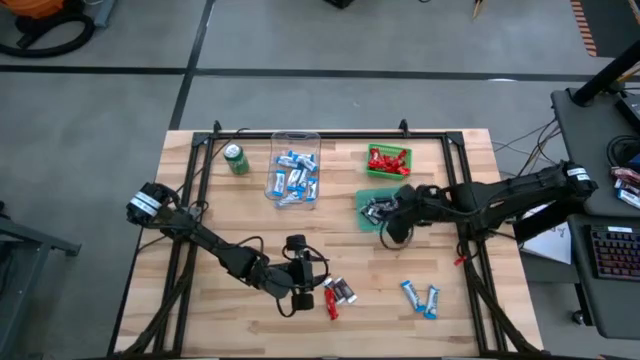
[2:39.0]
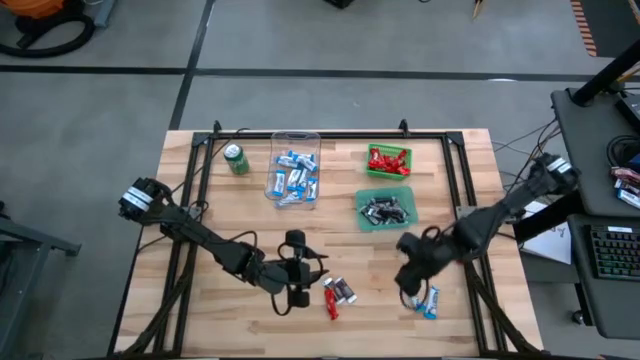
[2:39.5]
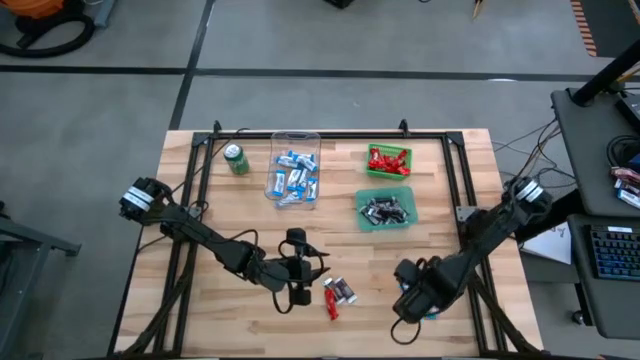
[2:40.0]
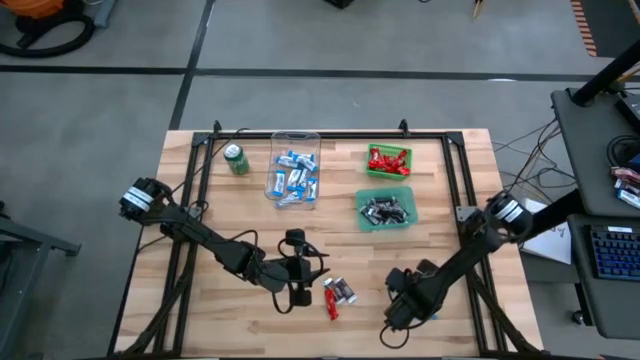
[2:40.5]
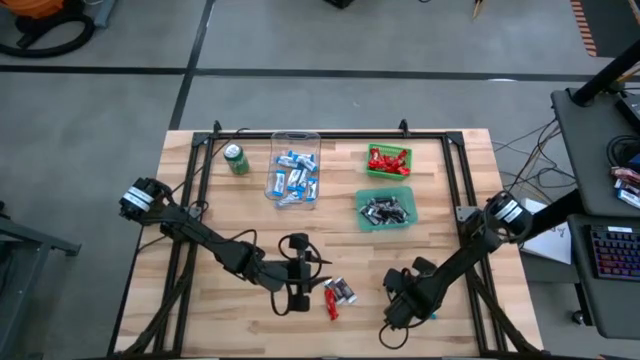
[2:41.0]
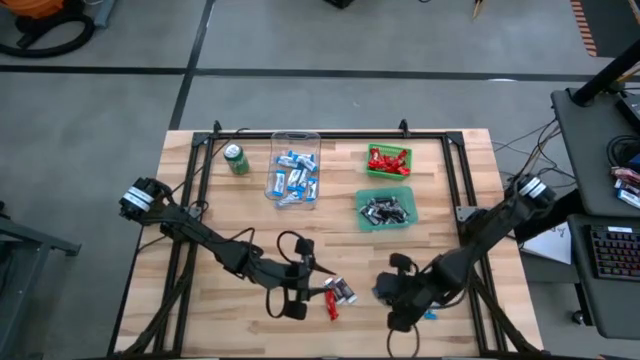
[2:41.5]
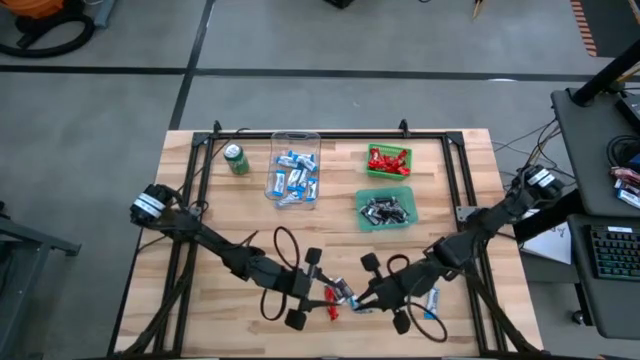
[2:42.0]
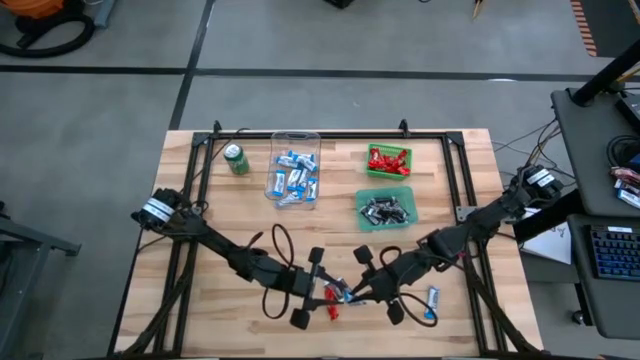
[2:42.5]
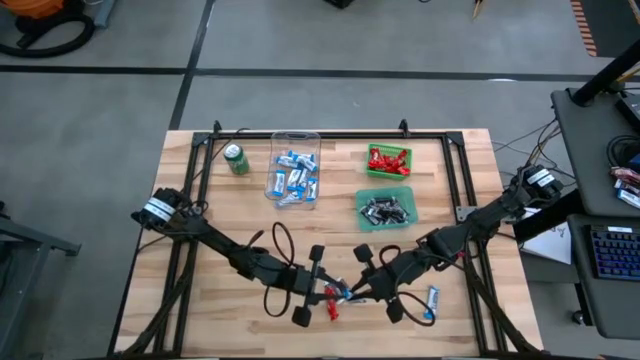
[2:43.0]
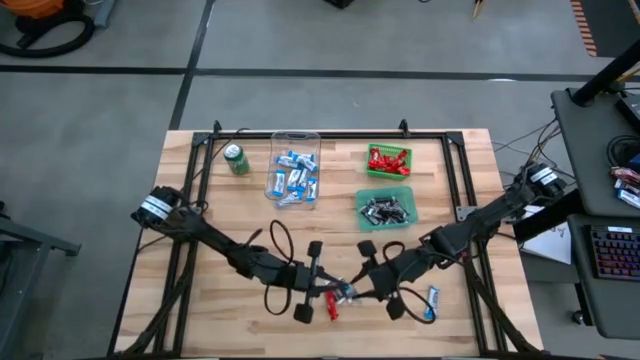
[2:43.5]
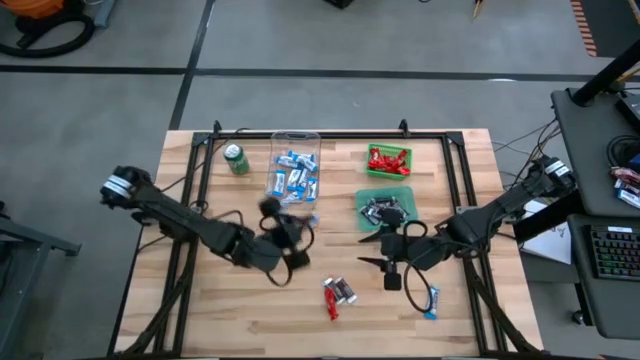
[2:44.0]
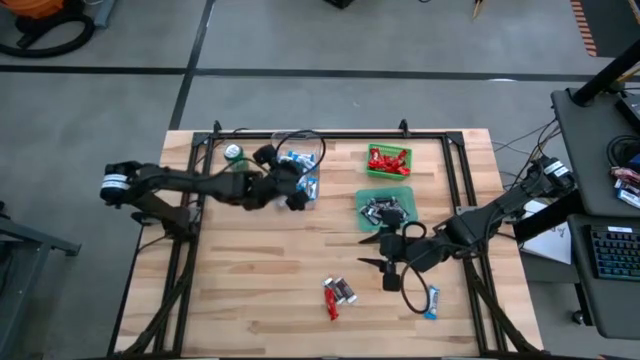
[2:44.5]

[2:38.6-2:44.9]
Task: Sort candy
Put the white candy into the transparent bin

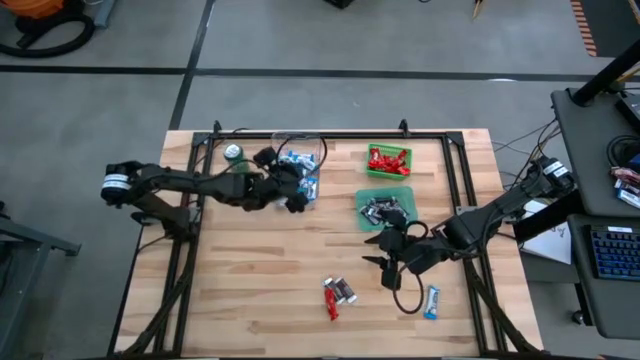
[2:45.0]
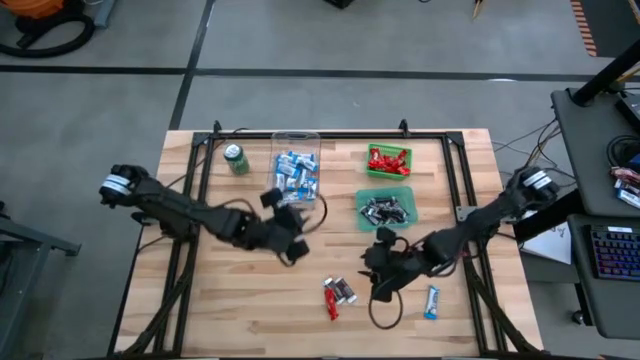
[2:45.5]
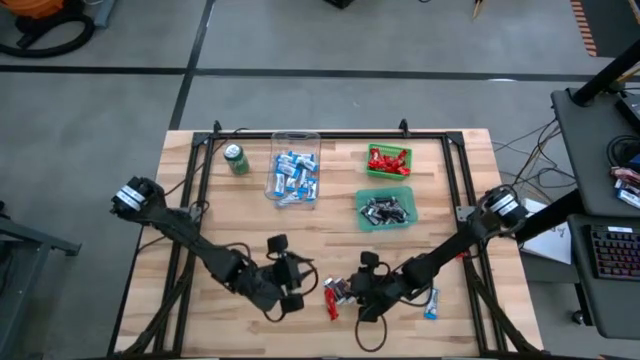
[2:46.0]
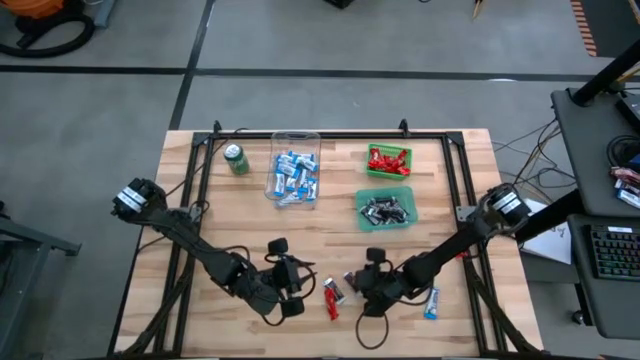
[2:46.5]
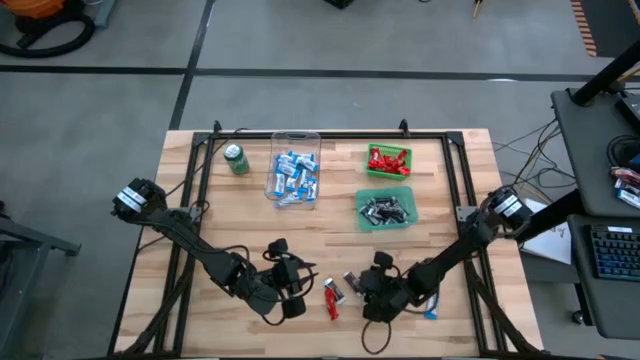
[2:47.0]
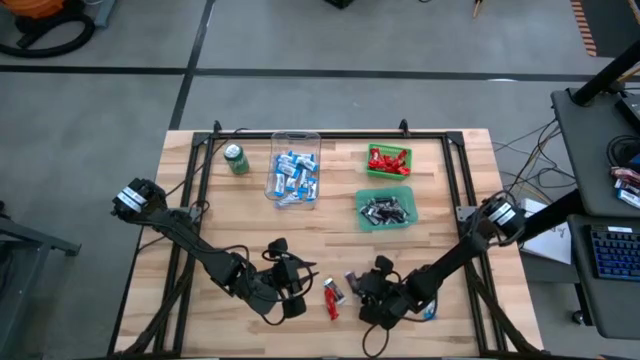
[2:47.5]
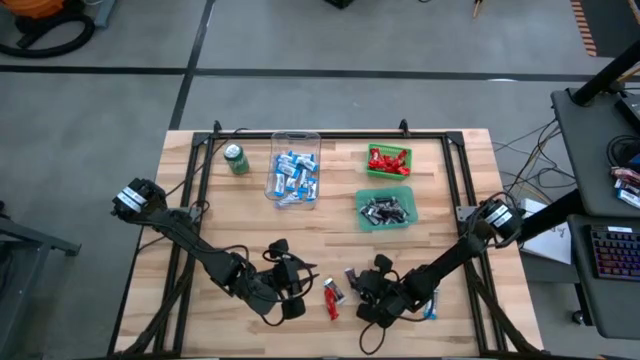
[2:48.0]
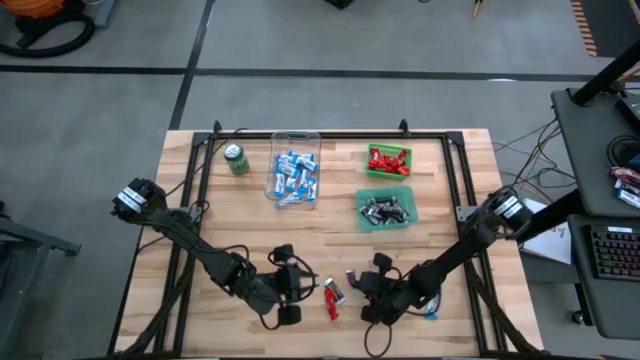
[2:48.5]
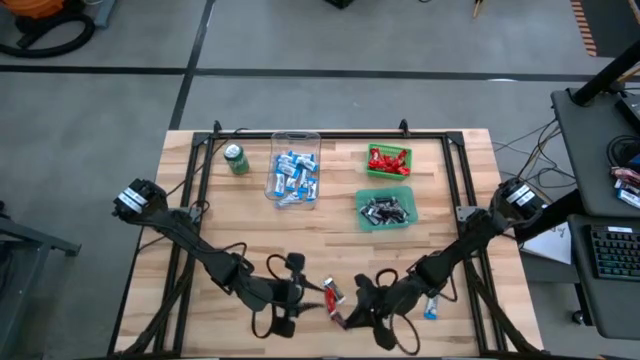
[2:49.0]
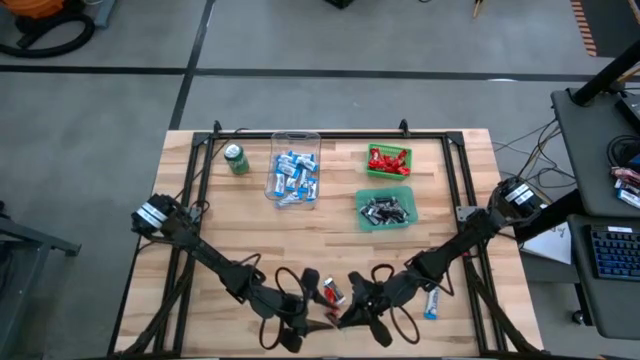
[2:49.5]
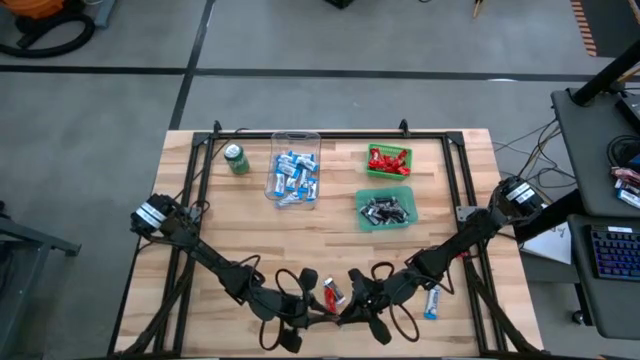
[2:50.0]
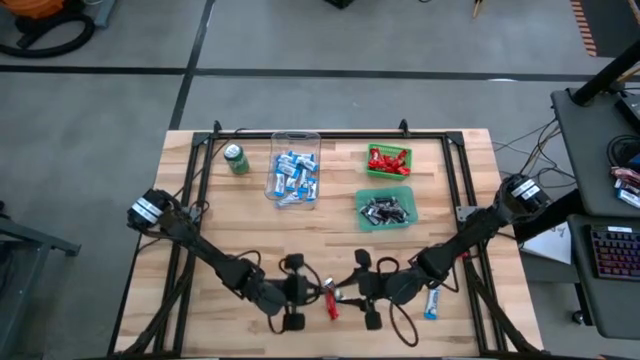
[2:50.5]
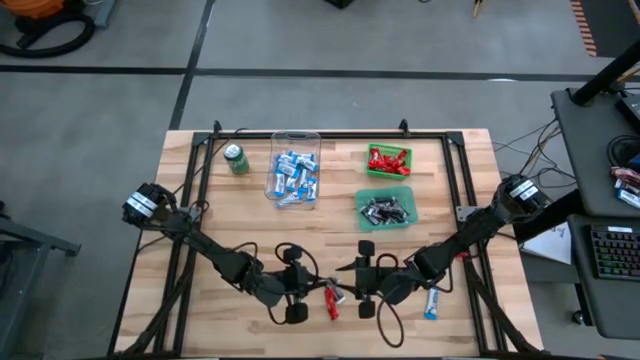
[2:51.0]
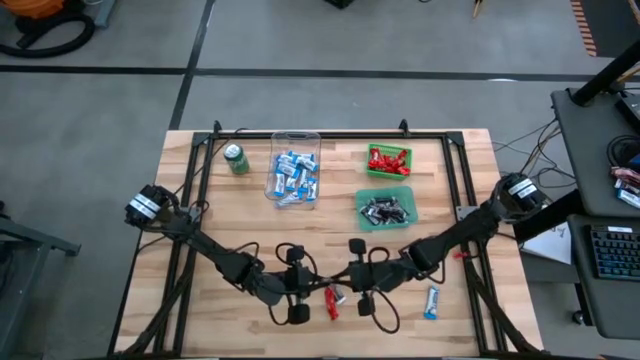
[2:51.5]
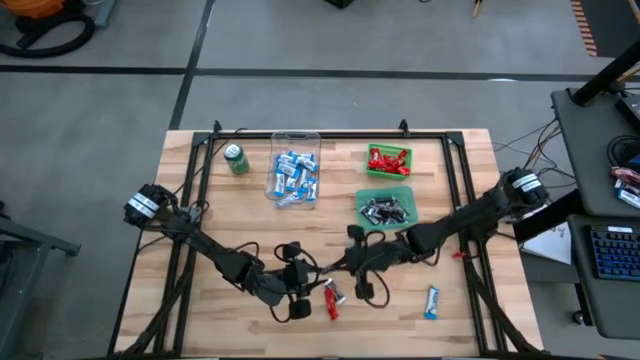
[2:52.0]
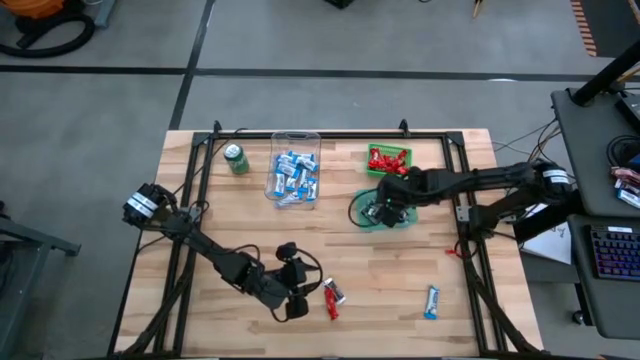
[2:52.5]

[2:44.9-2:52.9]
Put the brown candy into the blue bin

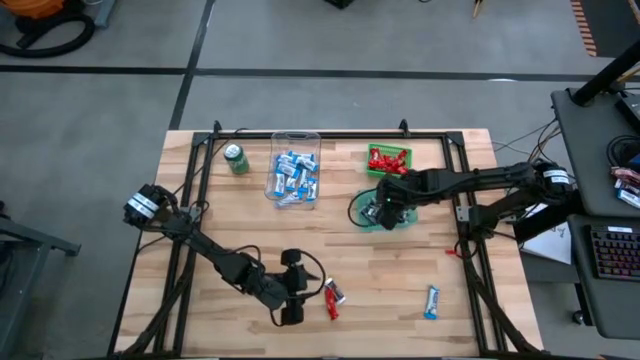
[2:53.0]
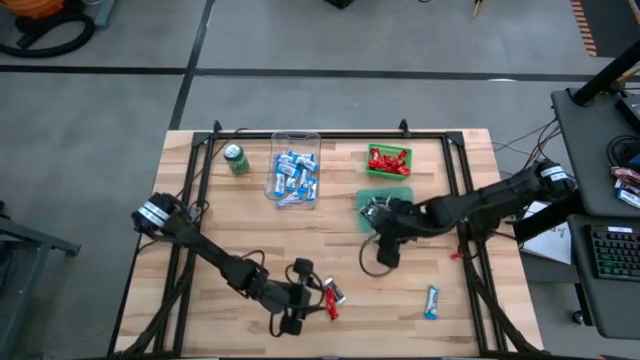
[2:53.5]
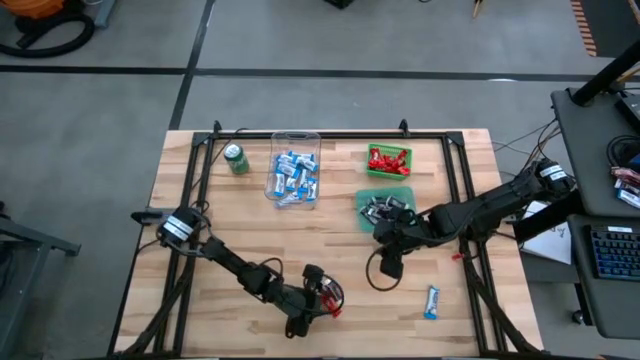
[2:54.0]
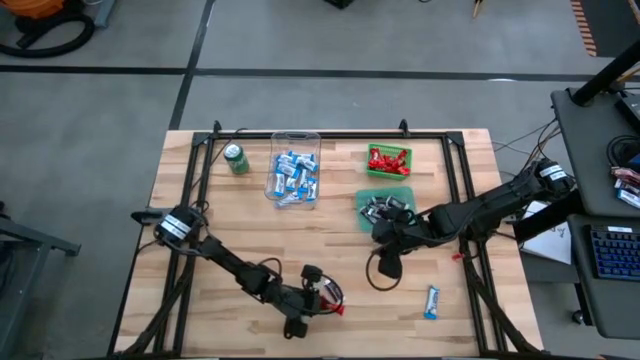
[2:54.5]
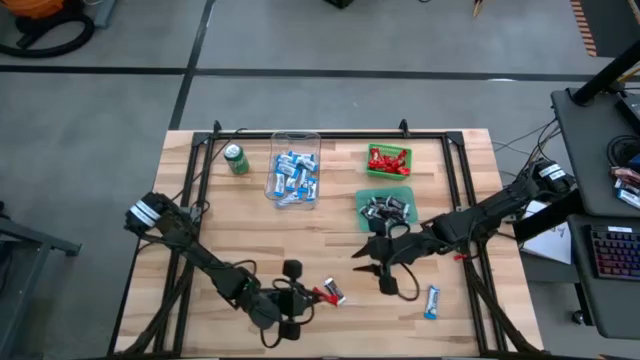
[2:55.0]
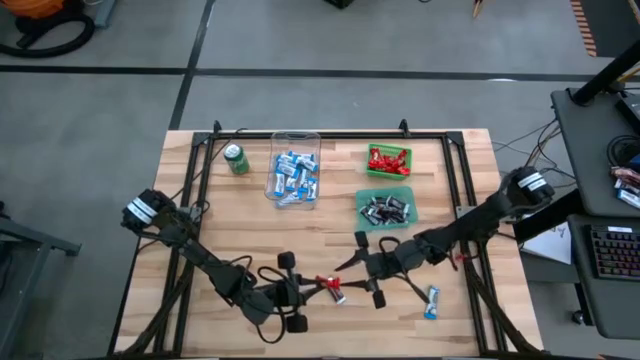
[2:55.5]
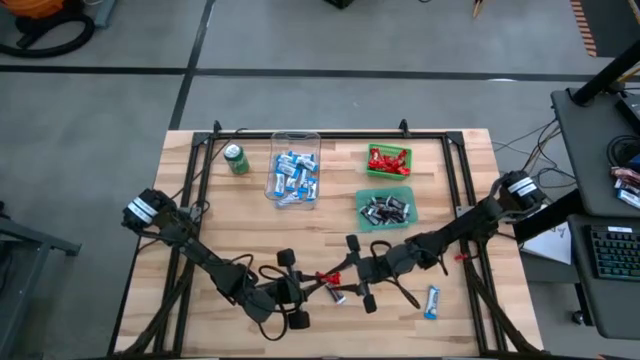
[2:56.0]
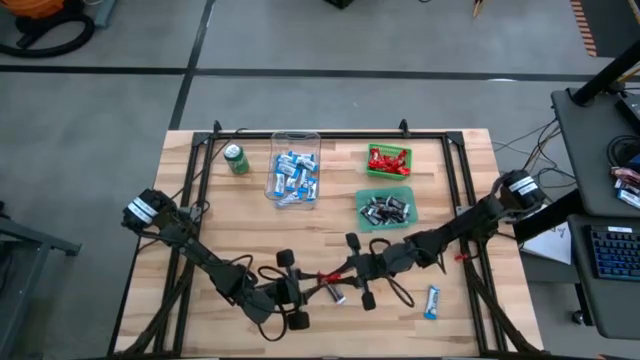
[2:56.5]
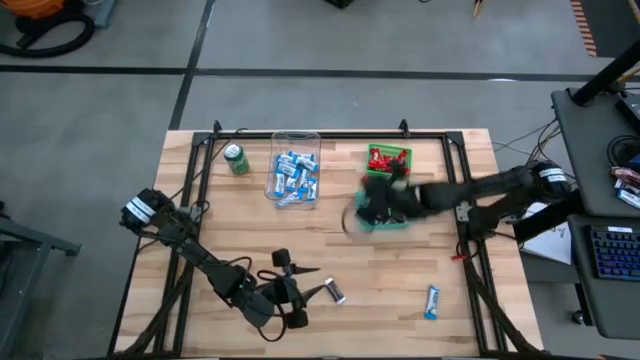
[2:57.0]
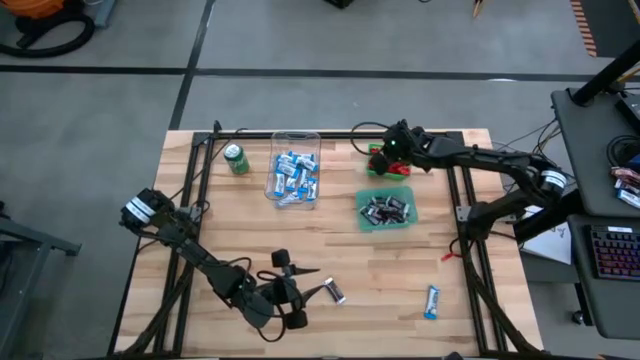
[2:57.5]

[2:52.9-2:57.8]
Put the red candy into the green bin

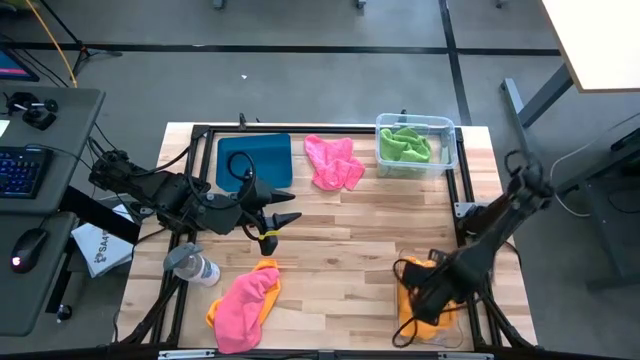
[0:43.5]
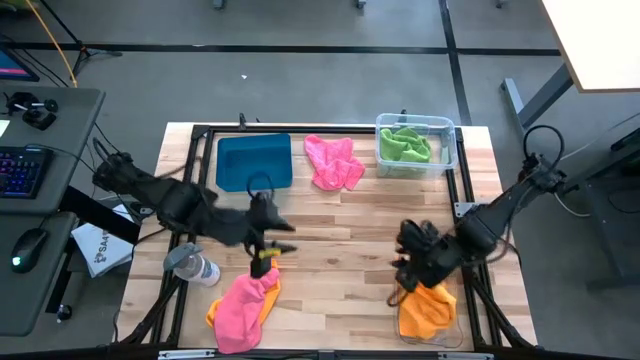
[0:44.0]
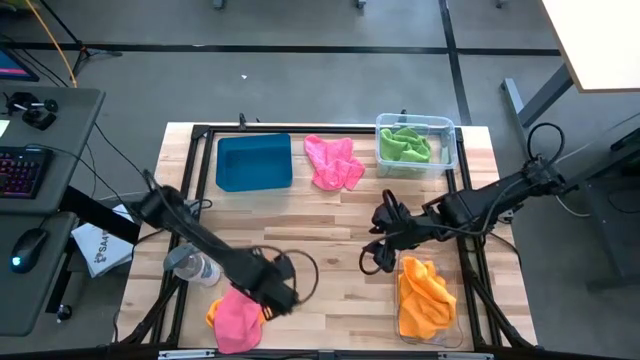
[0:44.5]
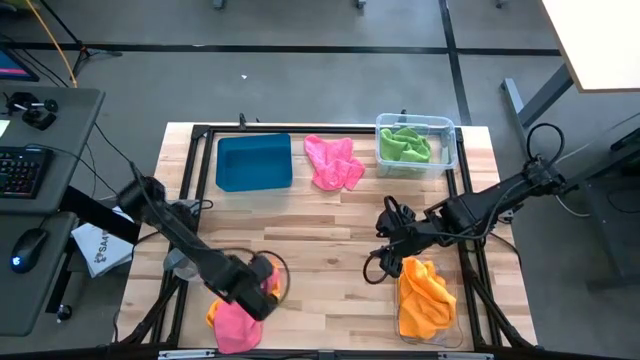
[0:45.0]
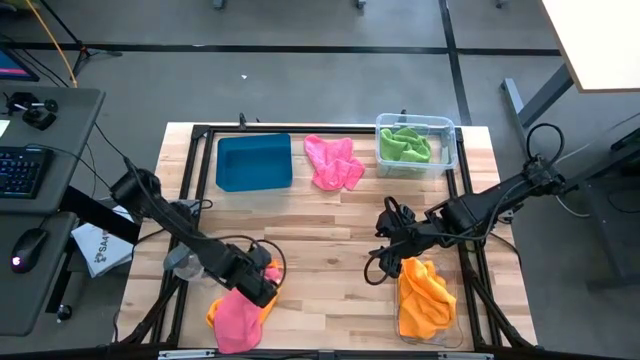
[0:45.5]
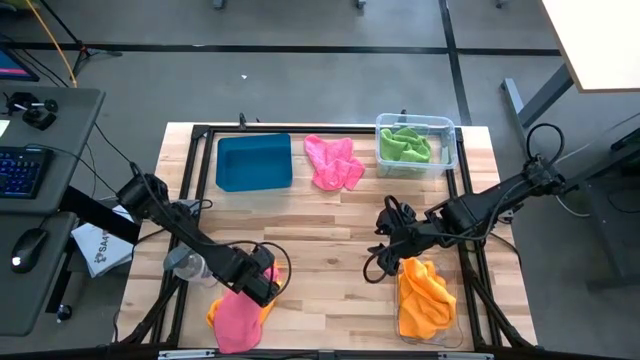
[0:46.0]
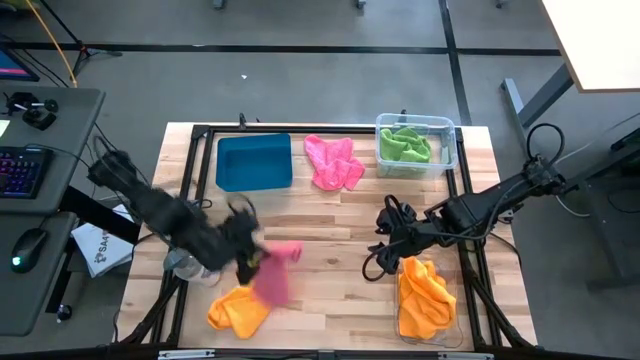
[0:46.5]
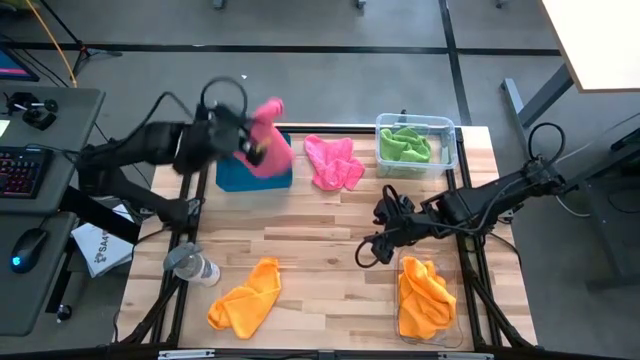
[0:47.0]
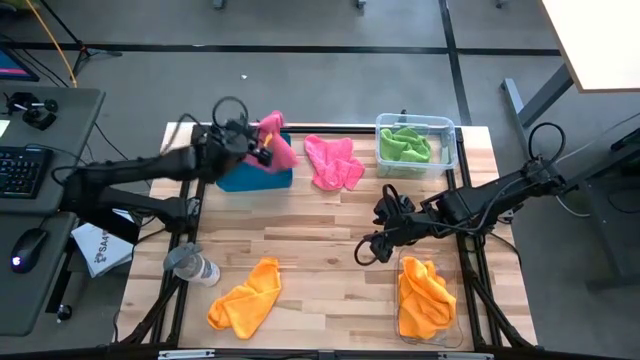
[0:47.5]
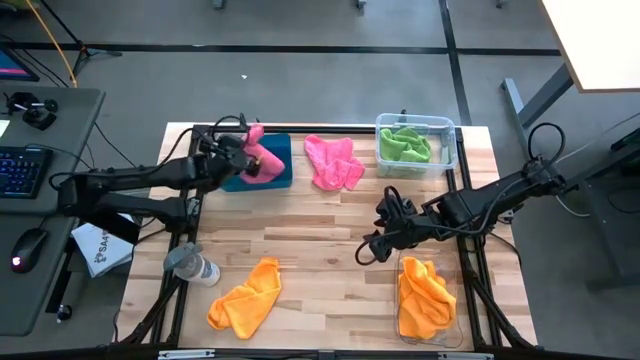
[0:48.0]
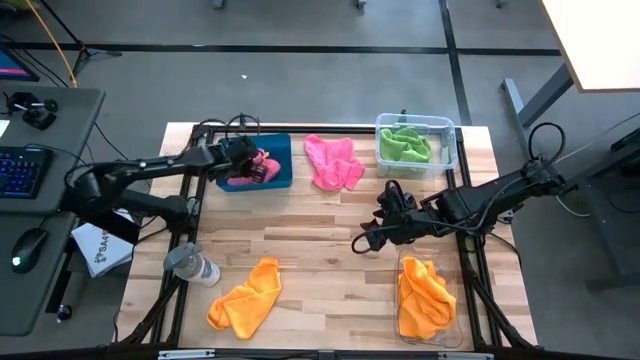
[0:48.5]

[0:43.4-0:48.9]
Task: Sort microfiber towel by color & place in baskets
Put the bottom pink towel into the blue bin
